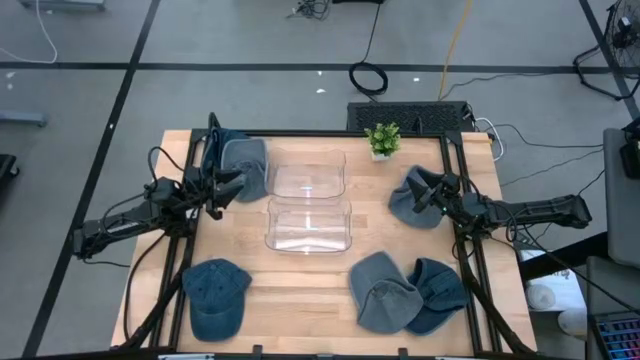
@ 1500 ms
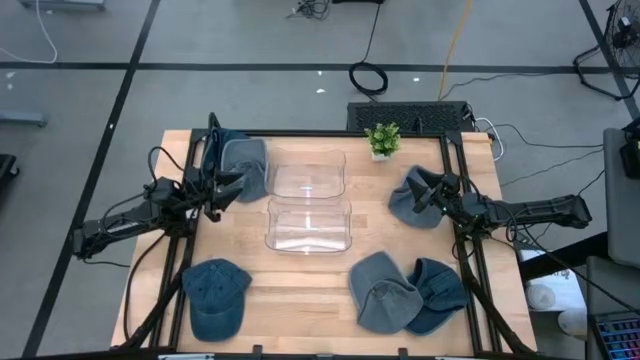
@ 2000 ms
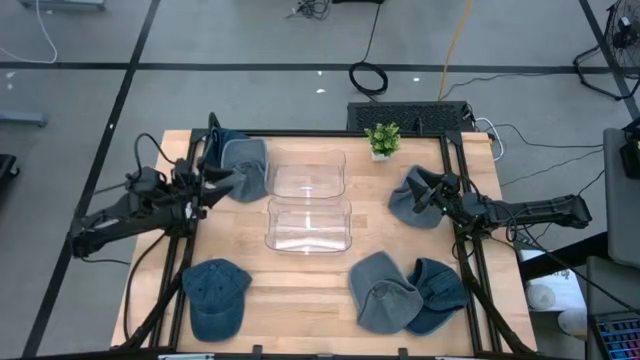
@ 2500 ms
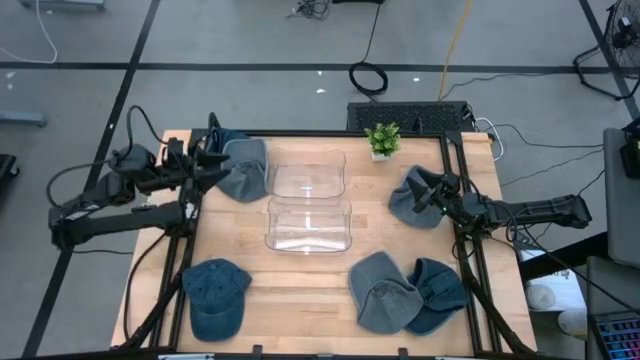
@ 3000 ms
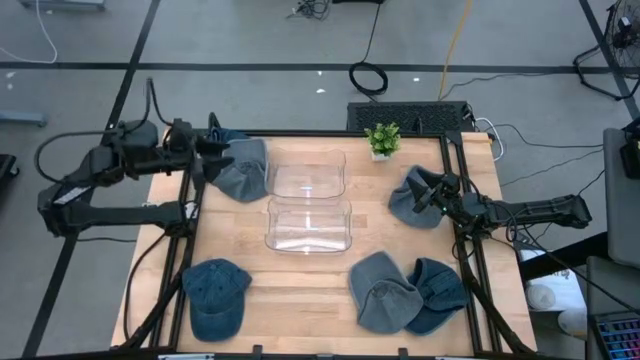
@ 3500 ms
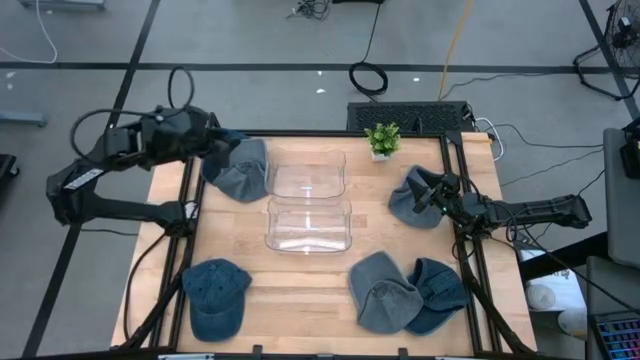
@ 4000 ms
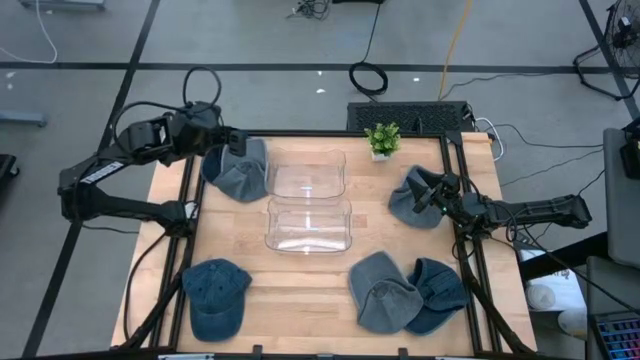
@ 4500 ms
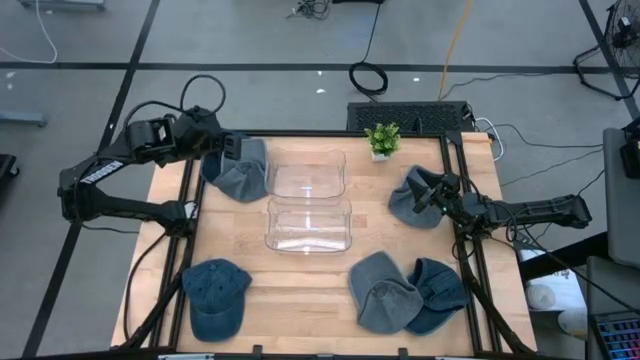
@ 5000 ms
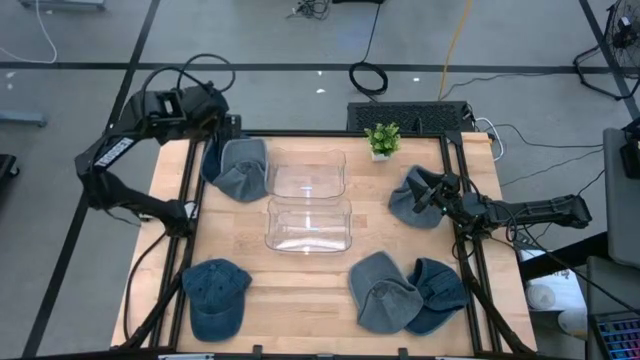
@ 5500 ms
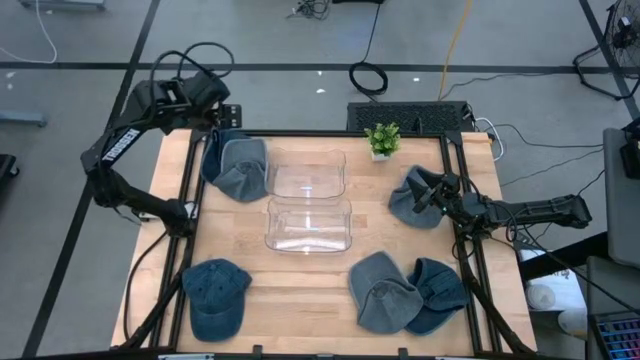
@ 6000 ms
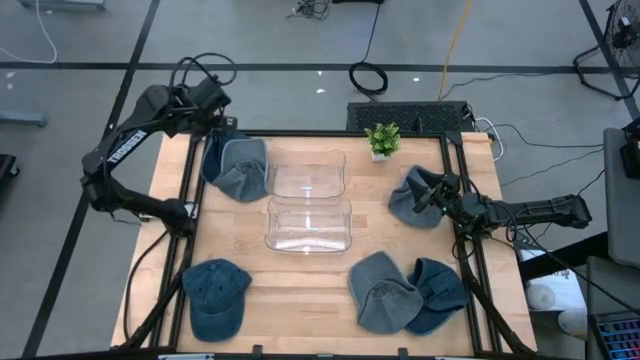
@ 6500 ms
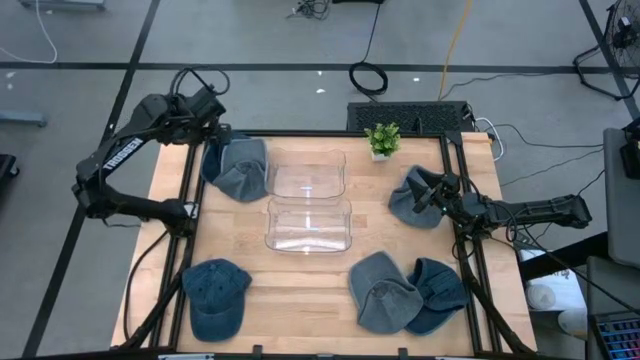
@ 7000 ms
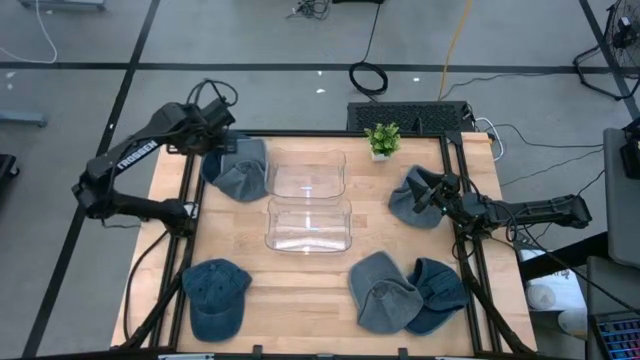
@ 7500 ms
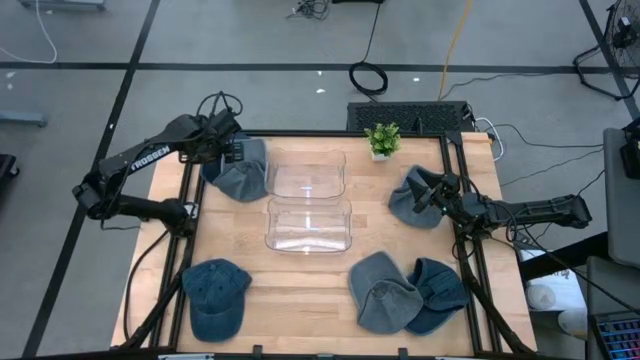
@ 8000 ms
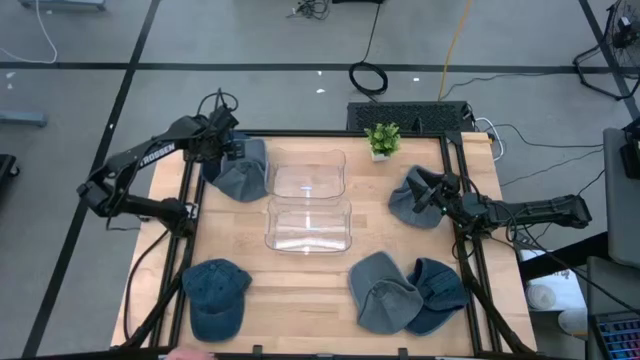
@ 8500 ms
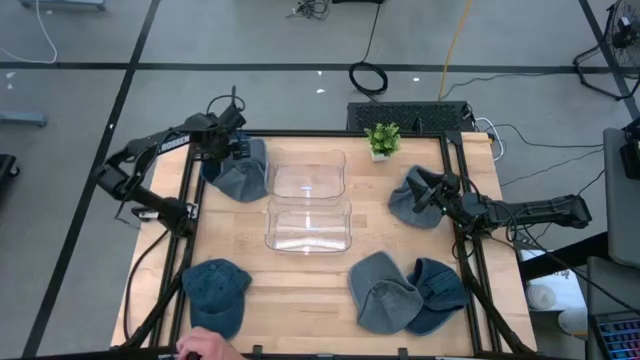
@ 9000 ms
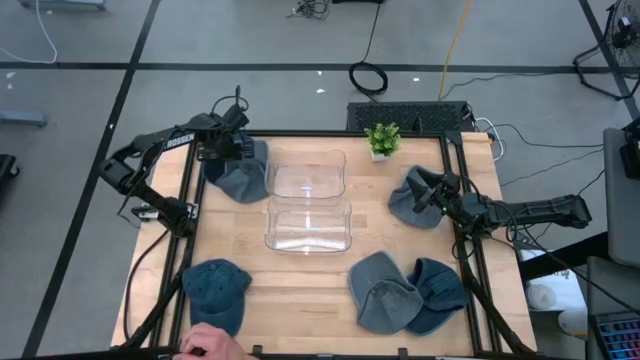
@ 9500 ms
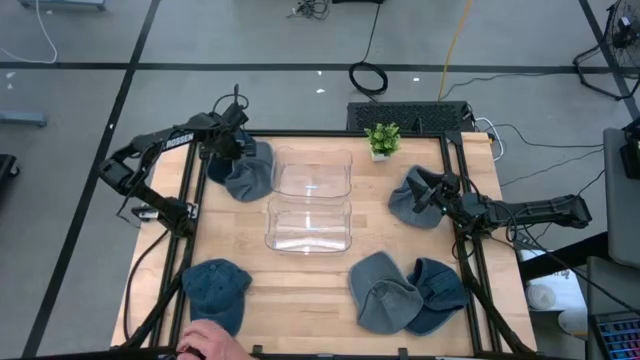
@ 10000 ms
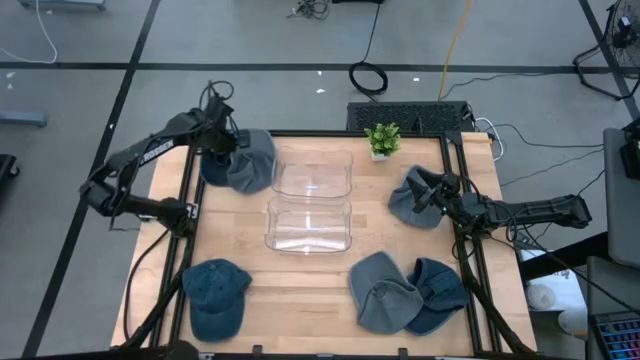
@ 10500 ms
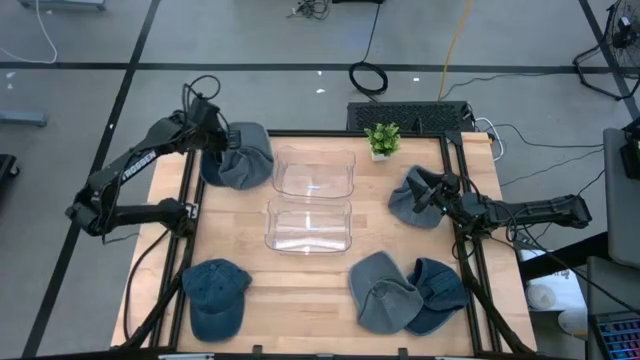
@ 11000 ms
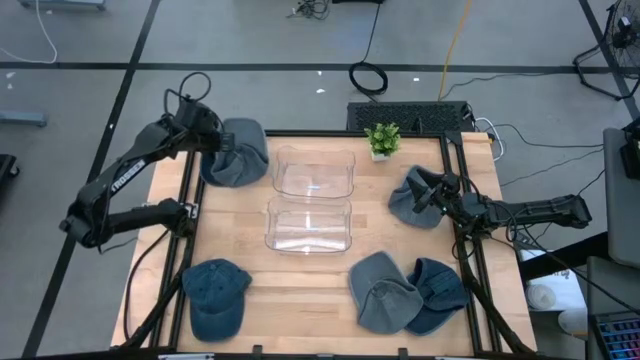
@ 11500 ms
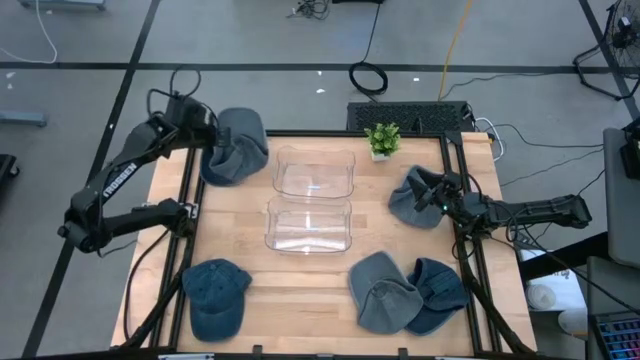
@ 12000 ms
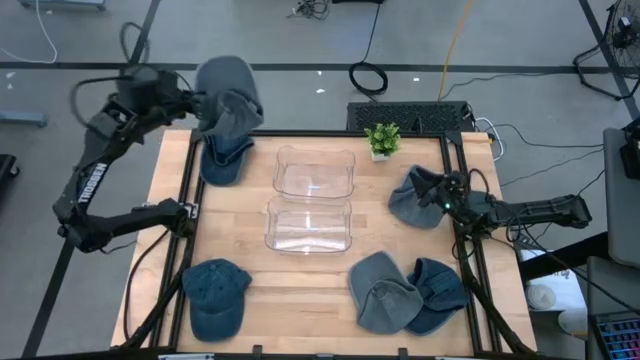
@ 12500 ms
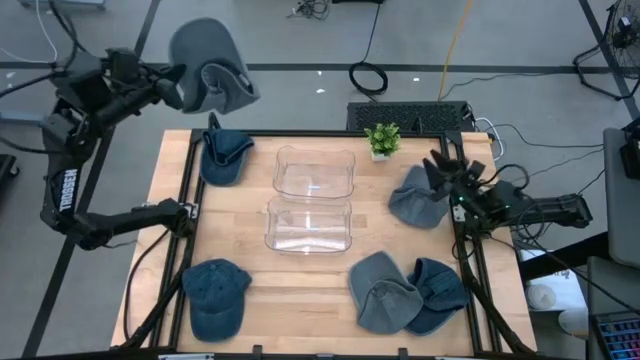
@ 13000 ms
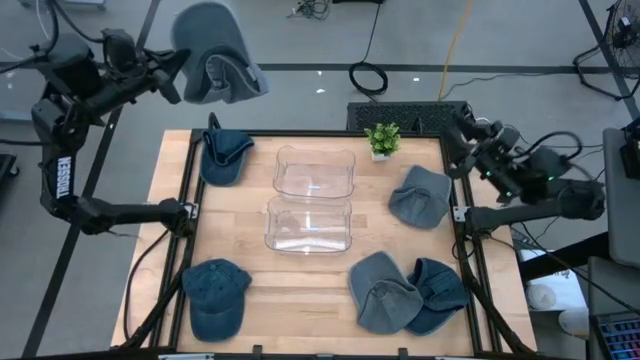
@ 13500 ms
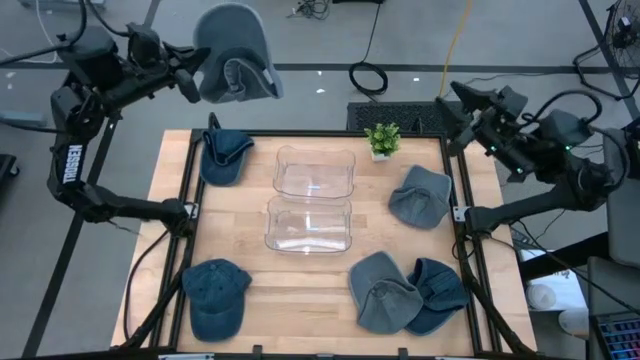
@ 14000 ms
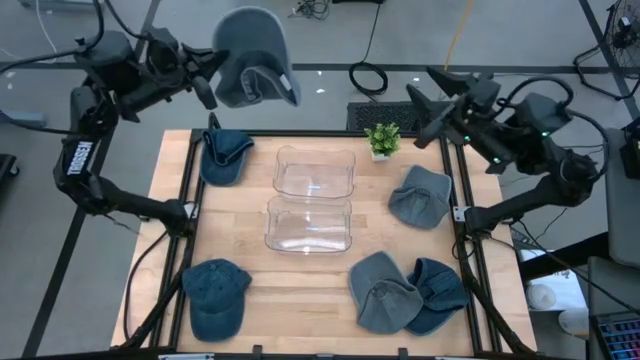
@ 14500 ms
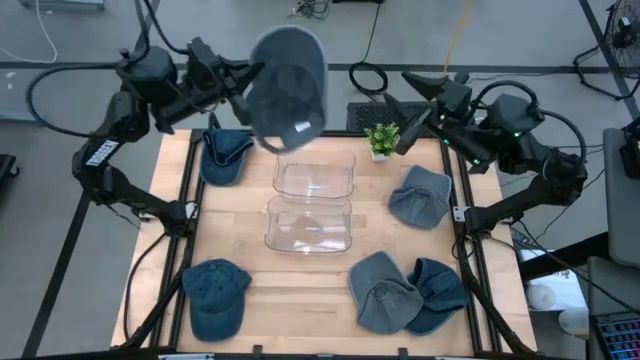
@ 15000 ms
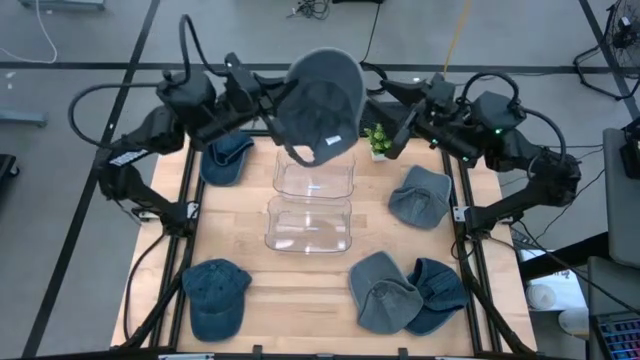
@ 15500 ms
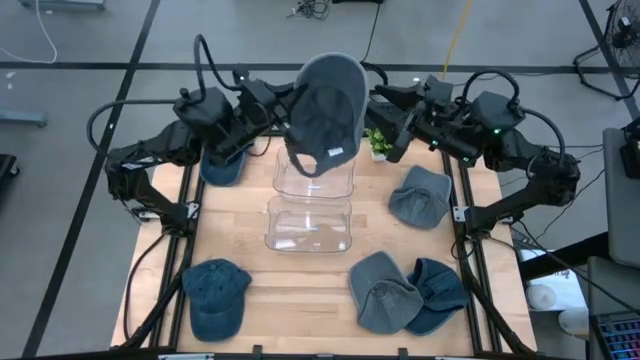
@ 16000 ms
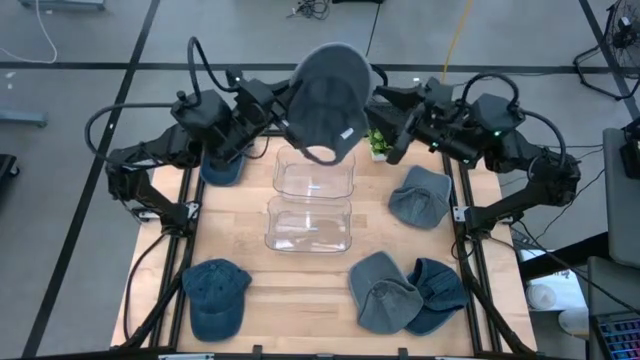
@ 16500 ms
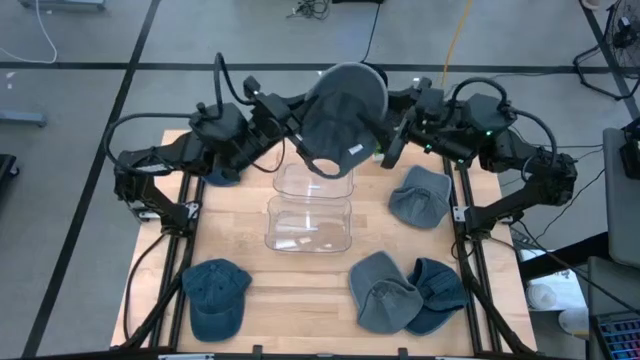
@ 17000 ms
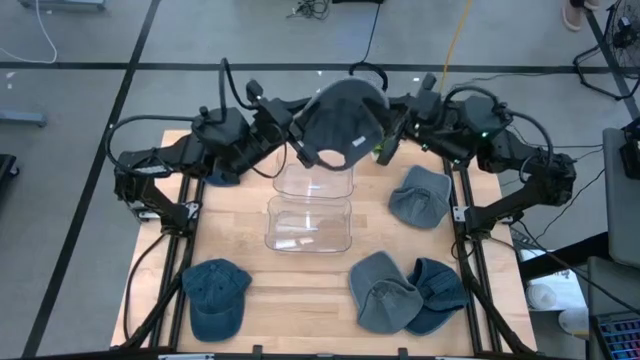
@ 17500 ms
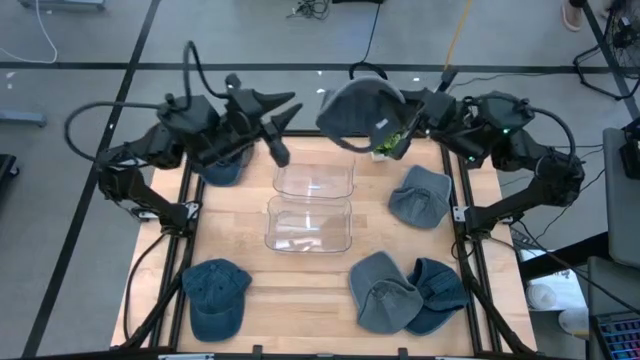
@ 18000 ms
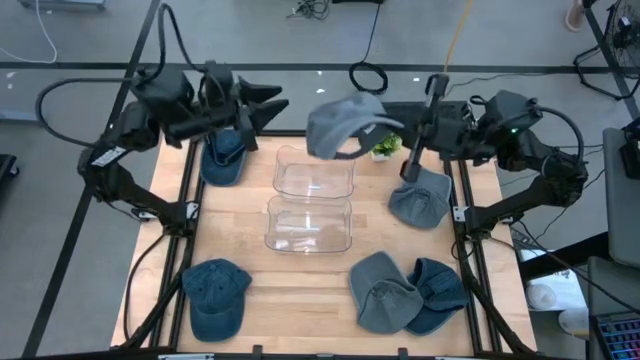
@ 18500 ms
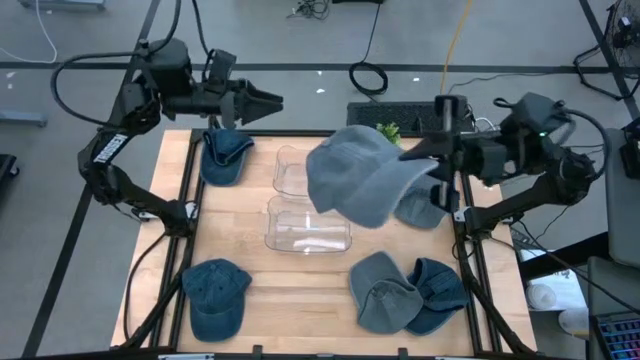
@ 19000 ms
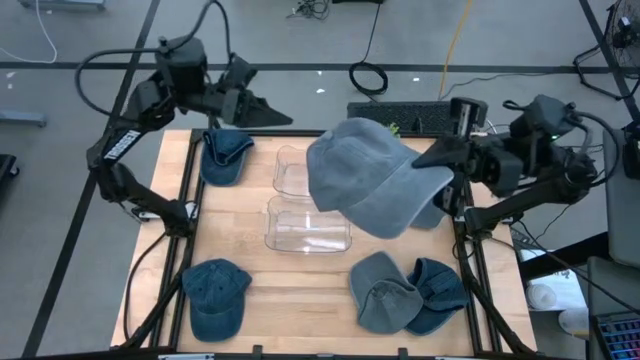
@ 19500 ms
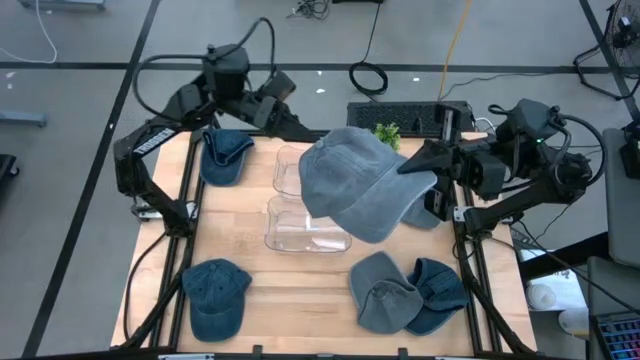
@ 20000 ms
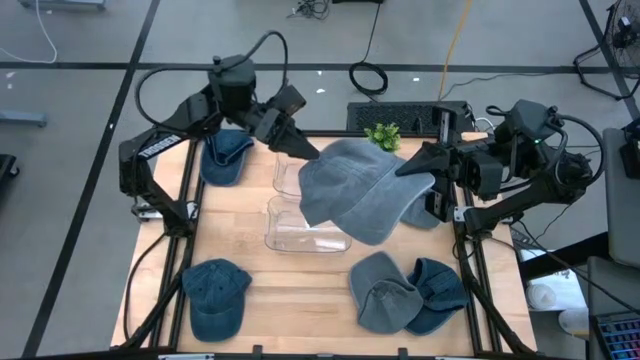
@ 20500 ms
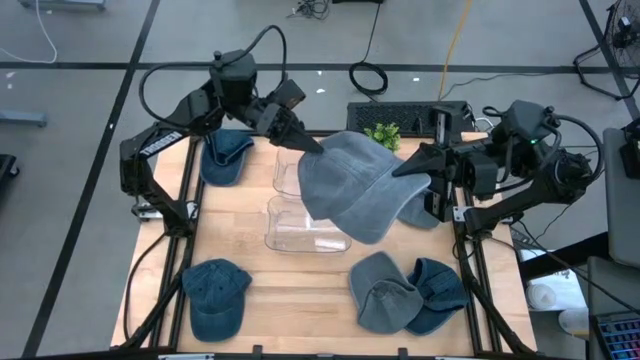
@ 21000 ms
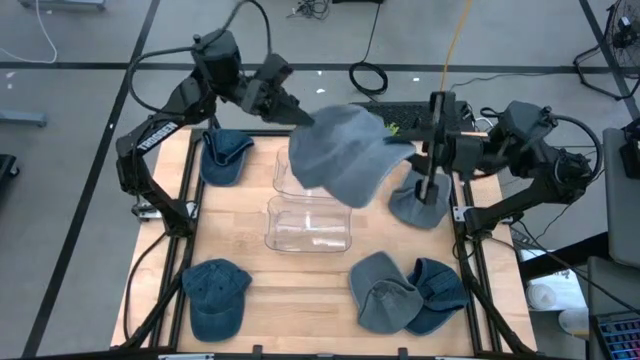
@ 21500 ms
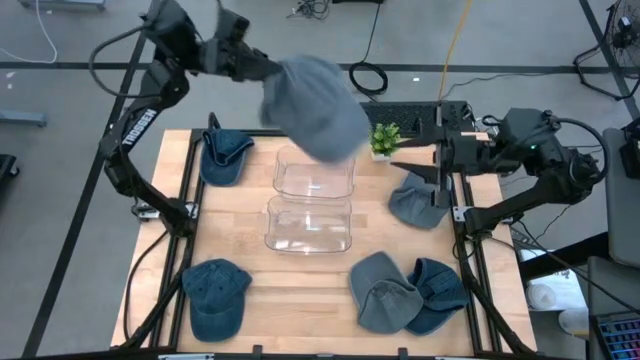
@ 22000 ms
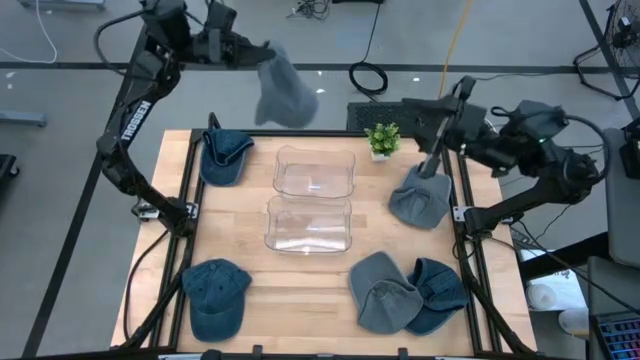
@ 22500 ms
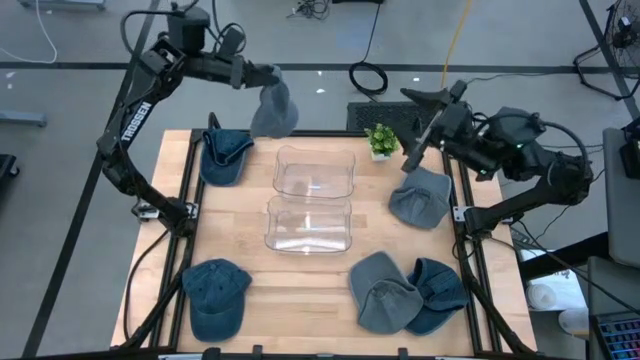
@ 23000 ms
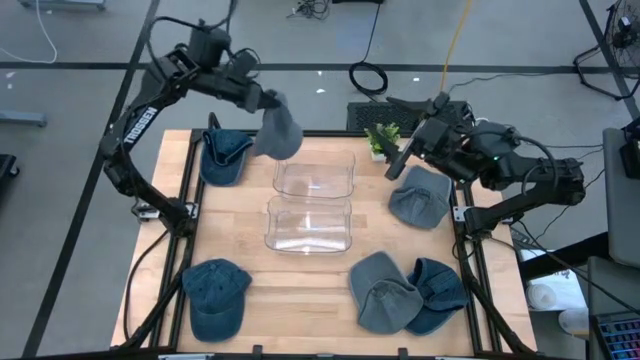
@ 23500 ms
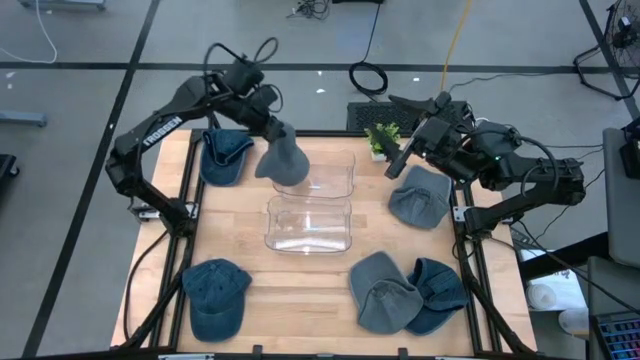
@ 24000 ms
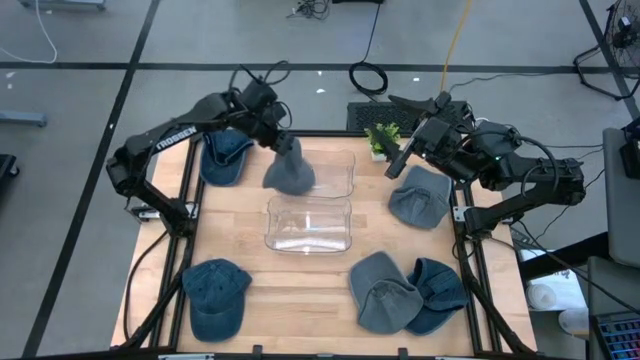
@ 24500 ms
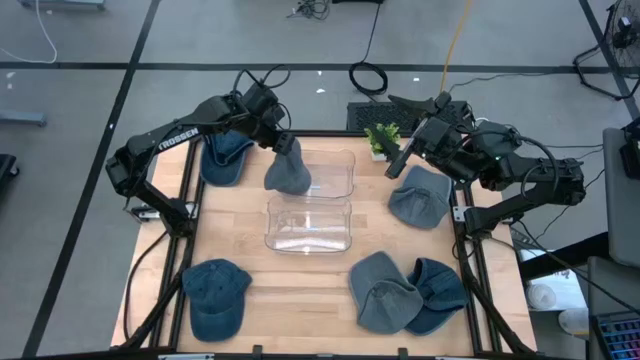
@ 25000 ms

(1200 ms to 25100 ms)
Task: Pick & Place hat
Put the top left gray cap into the top transparent bin
